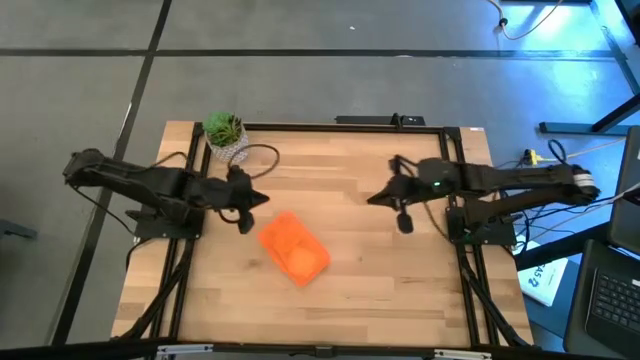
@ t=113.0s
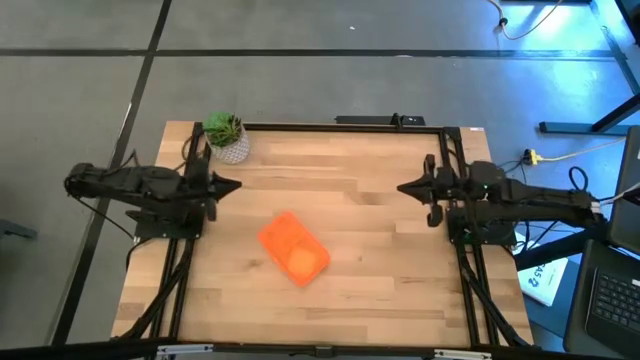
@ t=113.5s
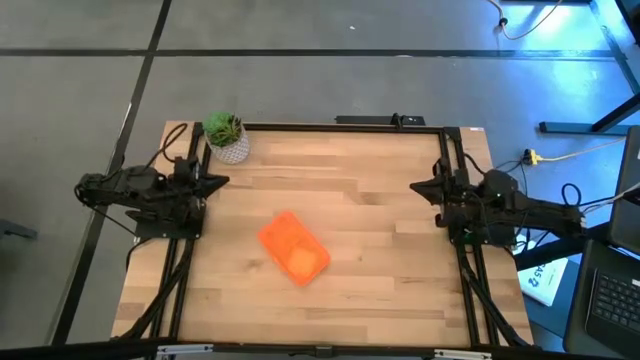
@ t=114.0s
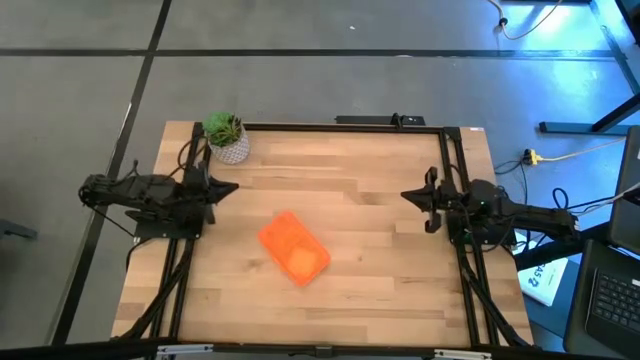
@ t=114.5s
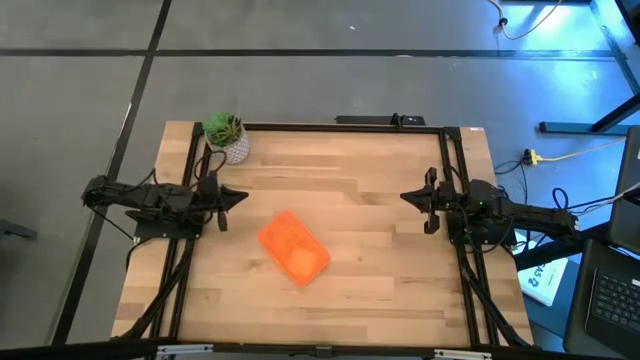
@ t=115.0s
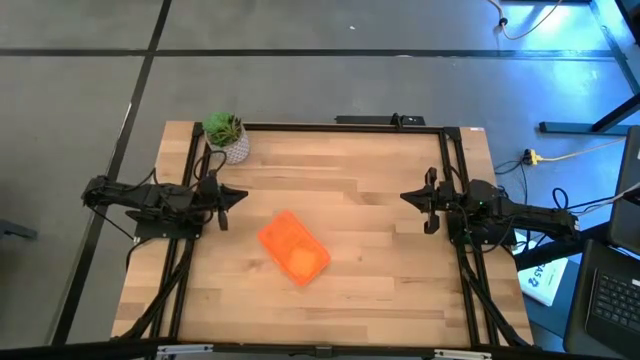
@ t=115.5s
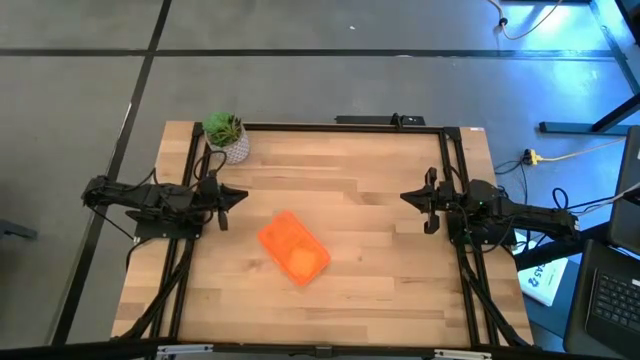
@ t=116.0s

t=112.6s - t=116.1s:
Task: Pack school essentials
Return to Home Position

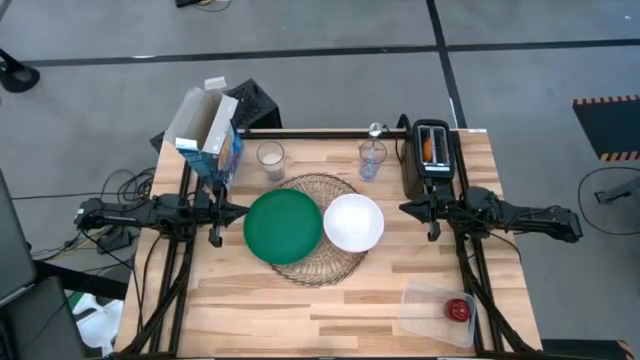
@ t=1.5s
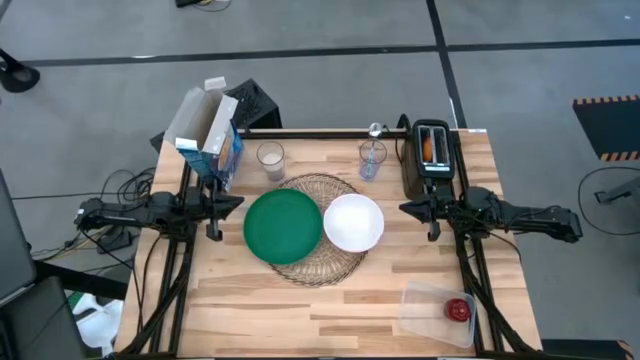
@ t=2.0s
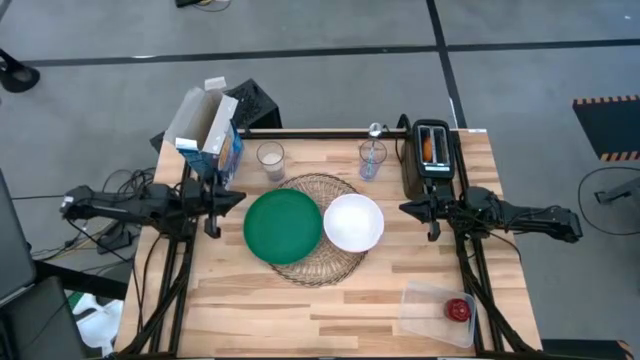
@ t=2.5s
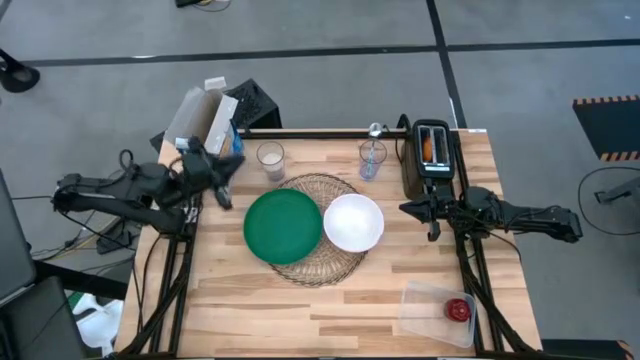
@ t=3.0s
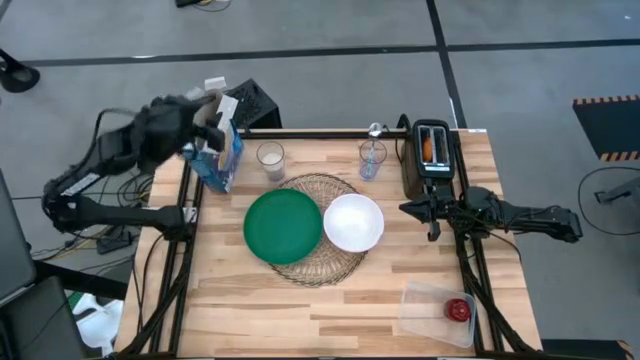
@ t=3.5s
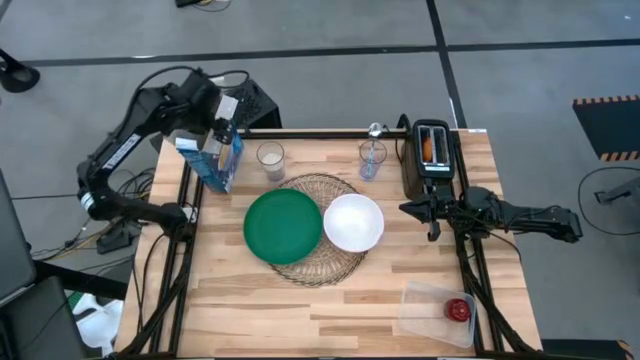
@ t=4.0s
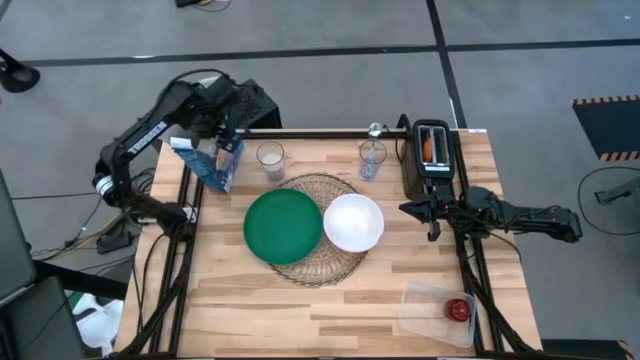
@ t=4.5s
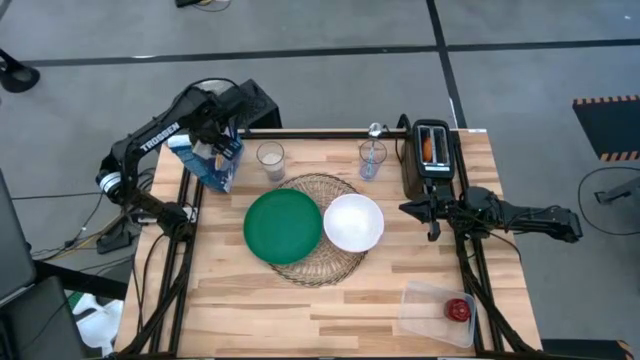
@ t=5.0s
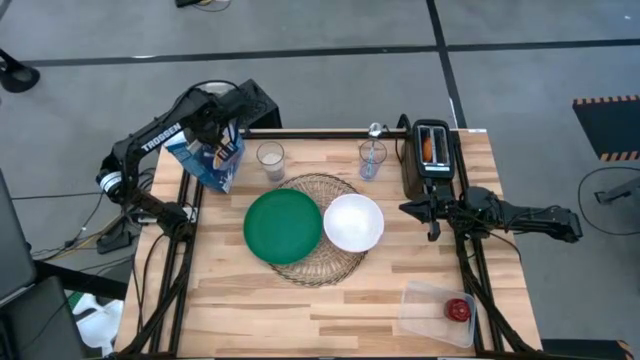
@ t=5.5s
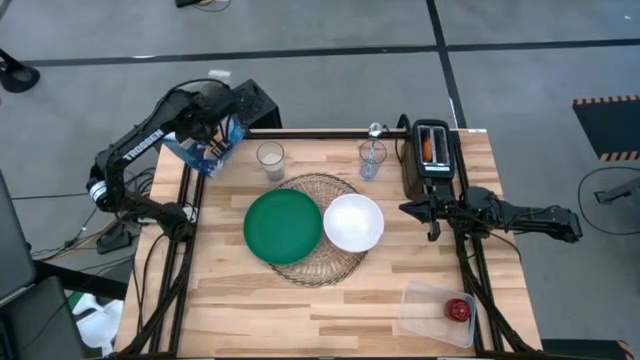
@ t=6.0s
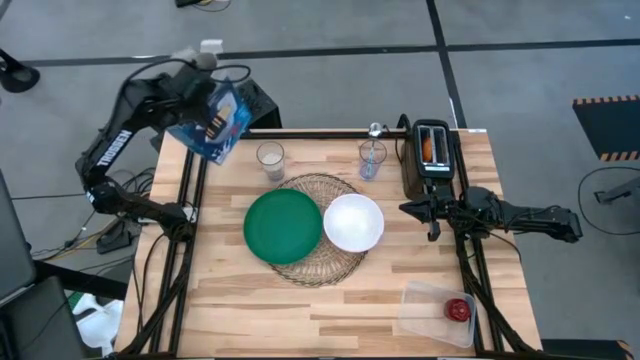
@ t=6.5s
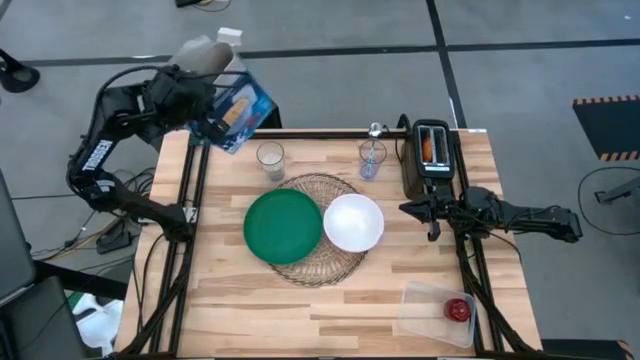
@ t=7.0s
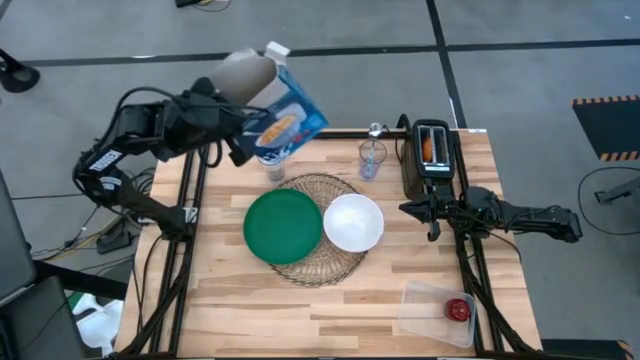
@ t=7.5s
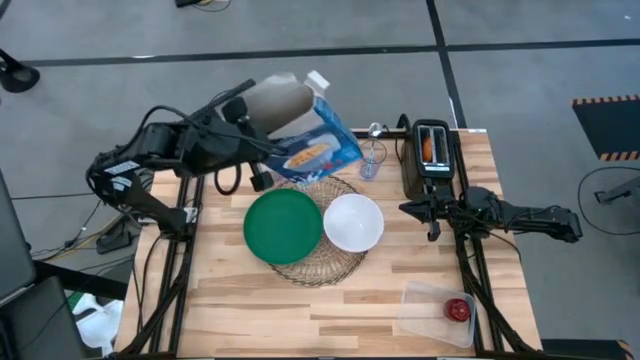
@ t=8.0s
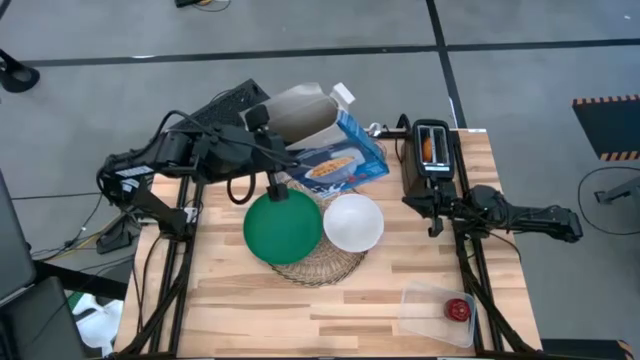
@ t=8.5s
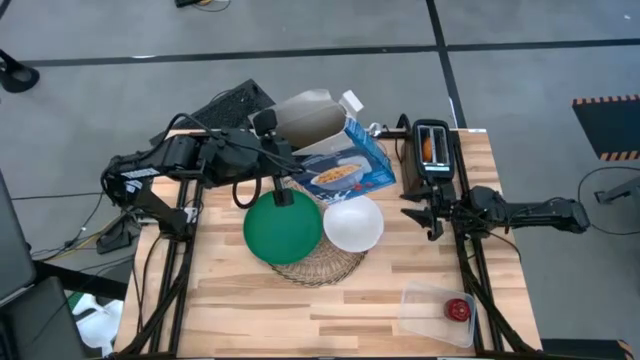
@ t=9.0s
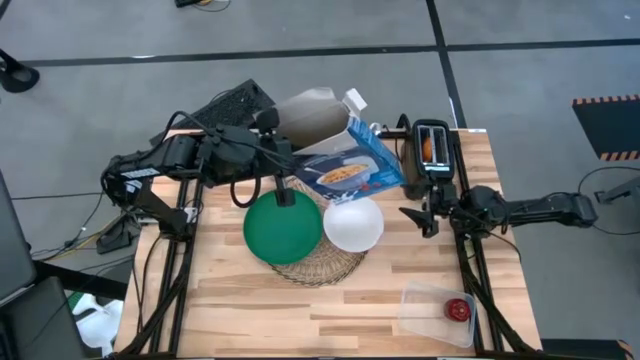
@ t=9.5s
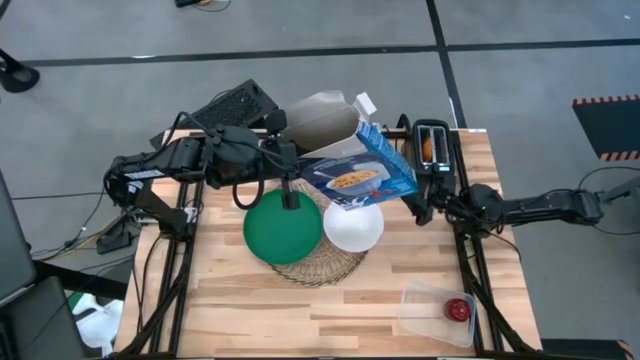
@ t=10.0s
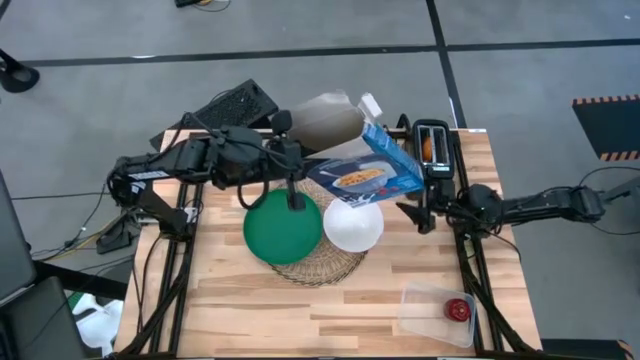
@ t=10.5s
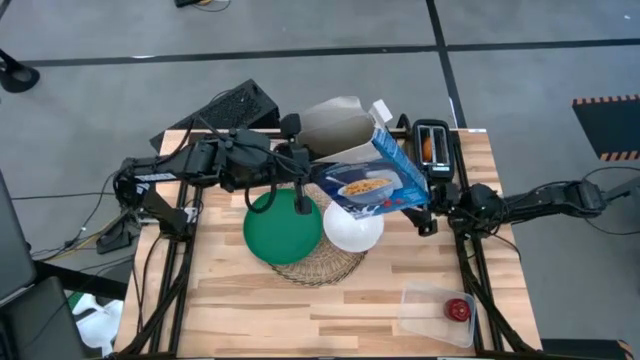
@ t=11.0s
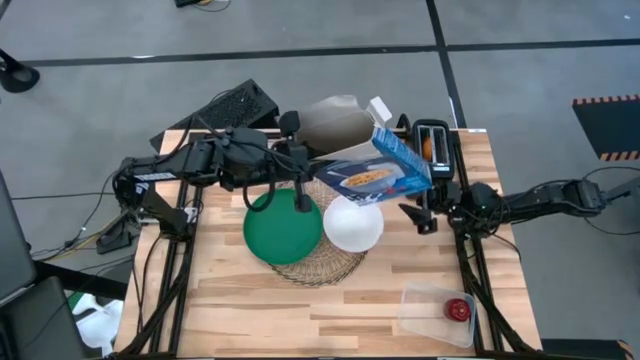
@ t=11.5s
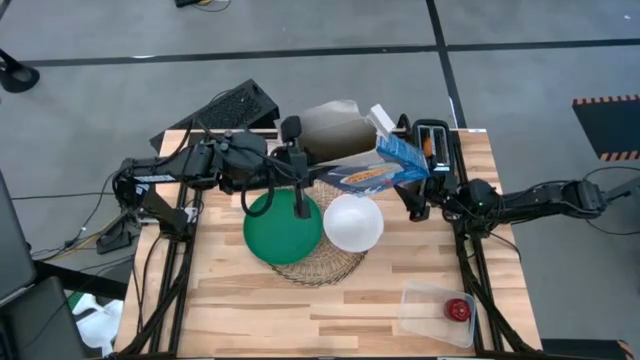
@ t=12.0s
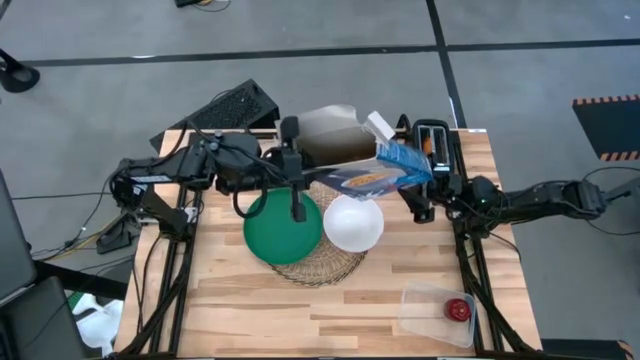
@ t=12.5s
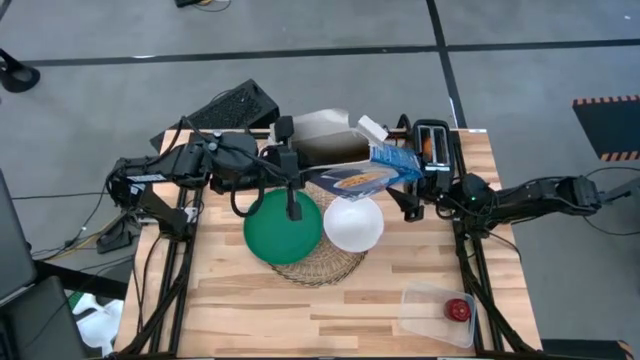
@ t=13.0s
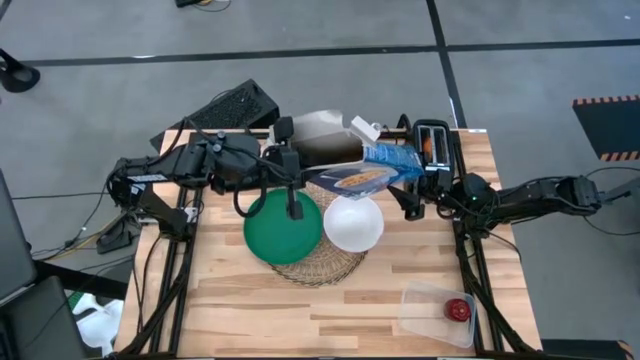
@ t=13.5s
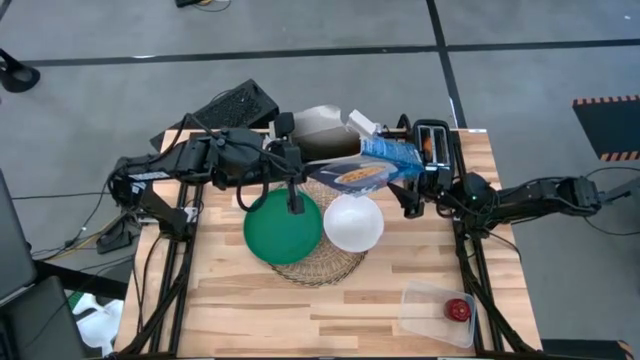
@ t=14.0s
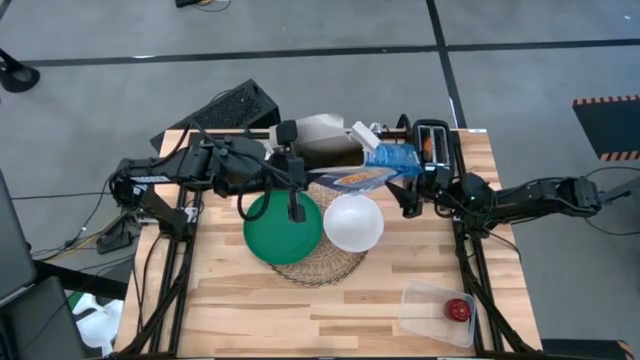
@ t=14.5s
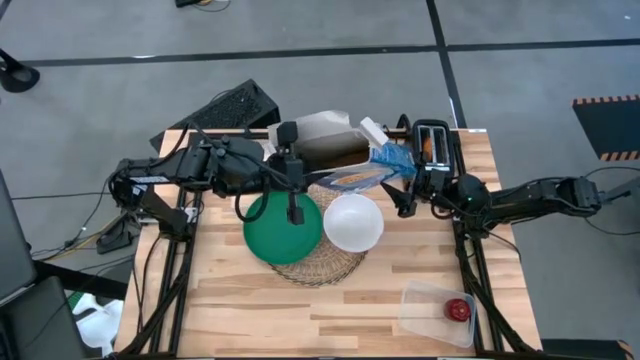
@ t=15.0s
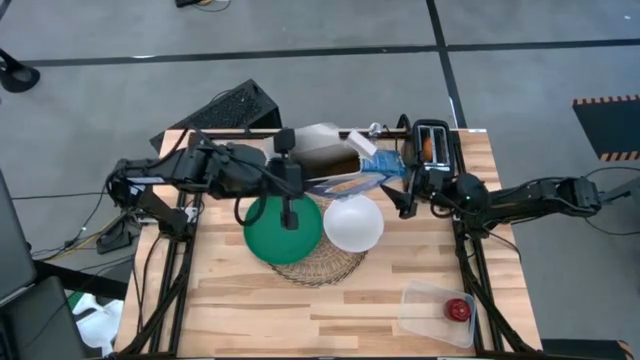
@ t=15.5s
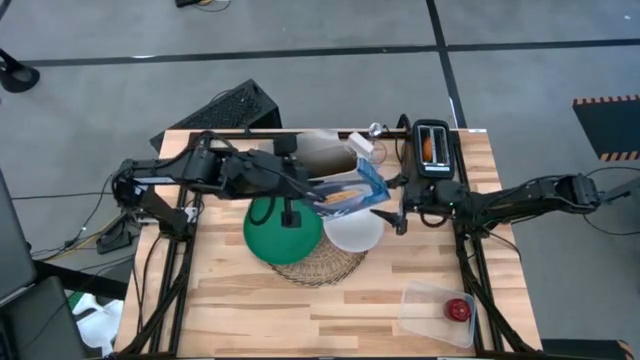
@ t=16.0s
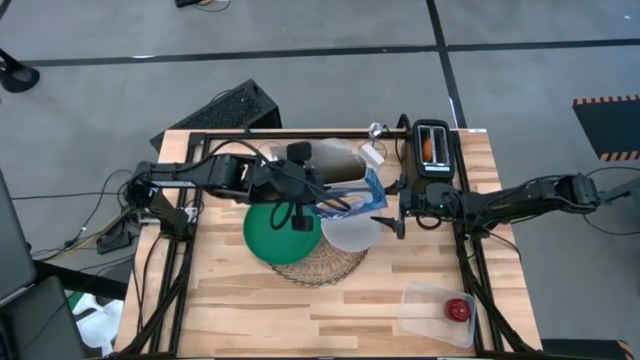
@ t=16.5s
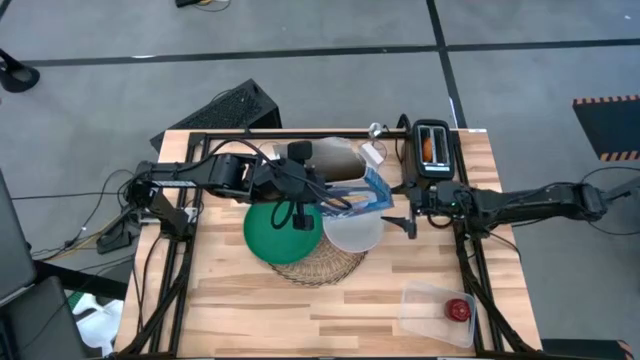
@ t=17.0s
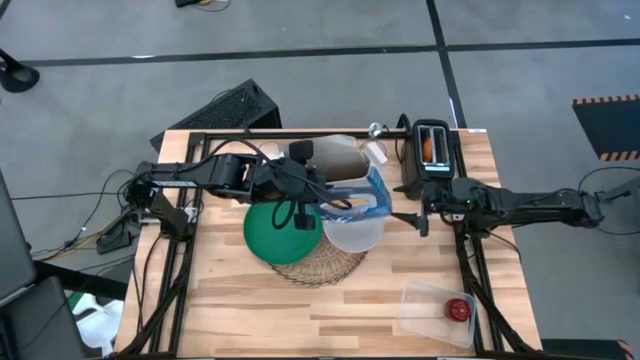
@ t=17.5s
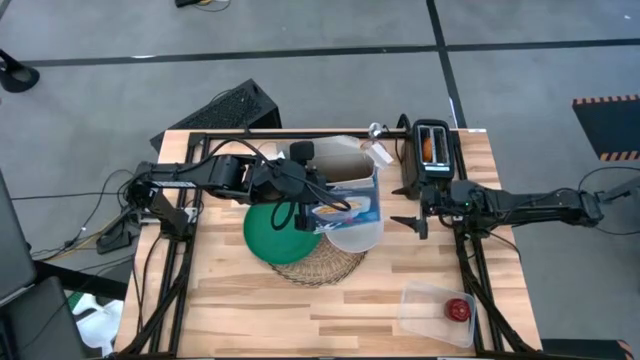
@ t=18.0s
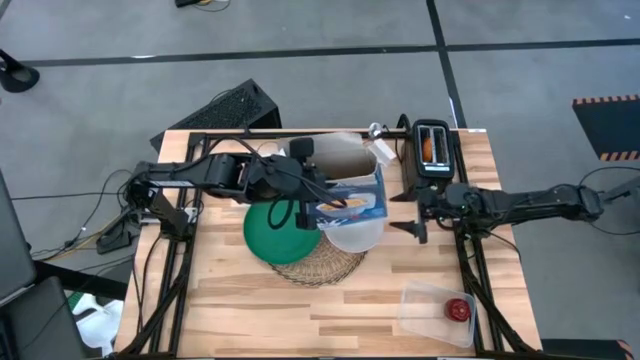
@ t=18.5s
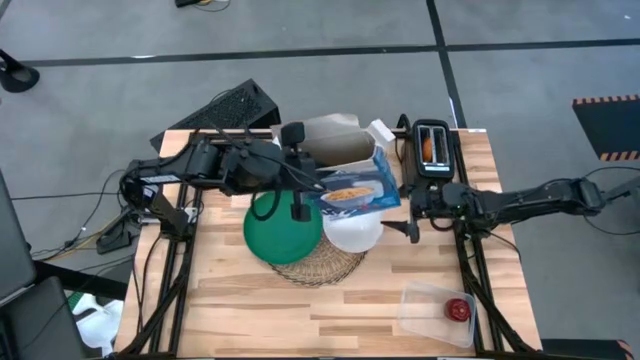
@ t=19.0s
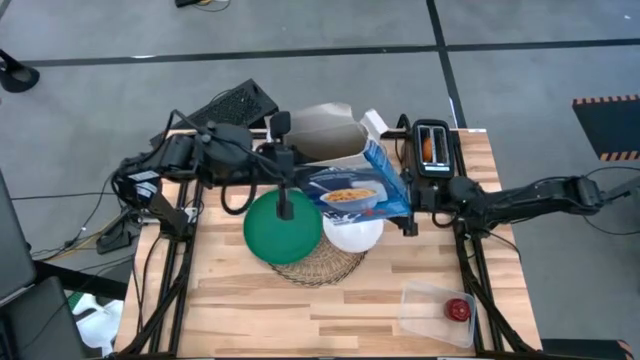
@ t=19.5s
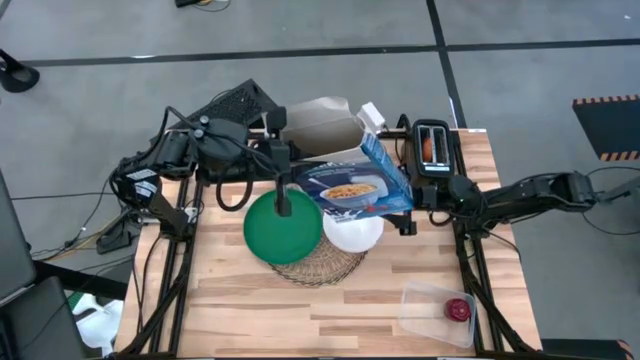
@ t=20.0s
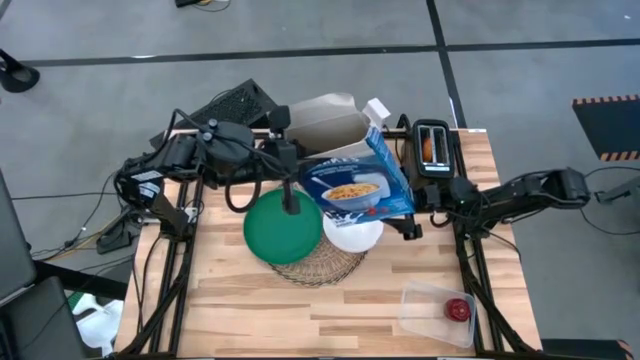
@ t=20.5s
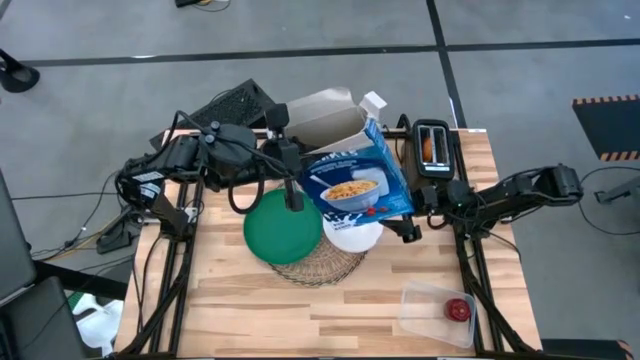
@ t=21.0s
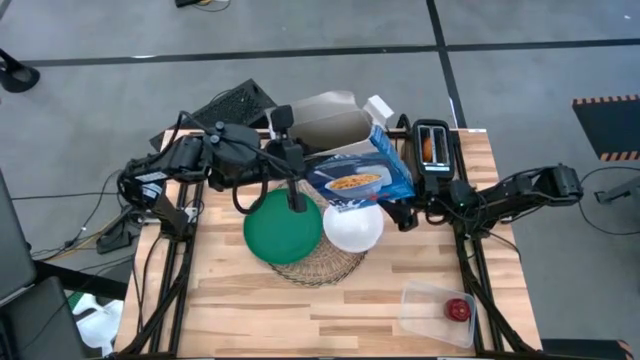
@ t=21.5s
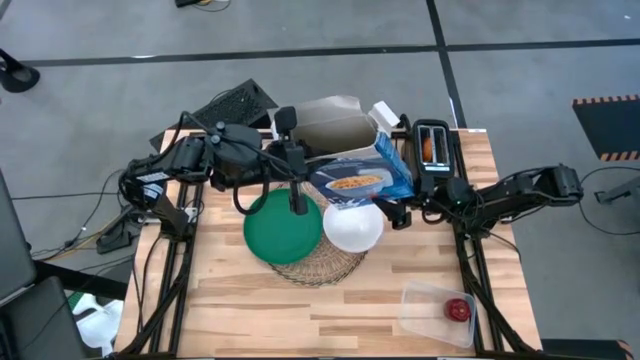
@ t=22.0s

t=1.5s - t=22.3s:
Task: Arrange a breakfast setting
Pour the cereal into the white bowl from the cereal box
